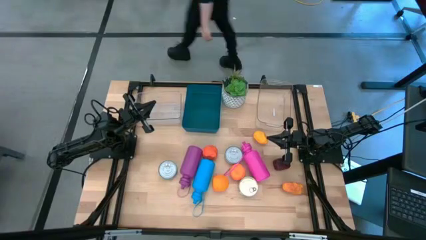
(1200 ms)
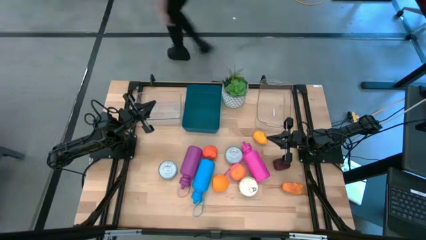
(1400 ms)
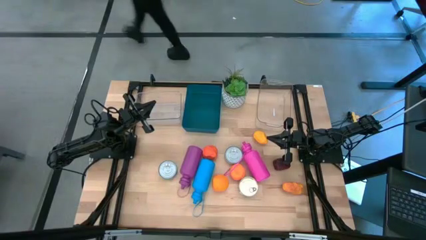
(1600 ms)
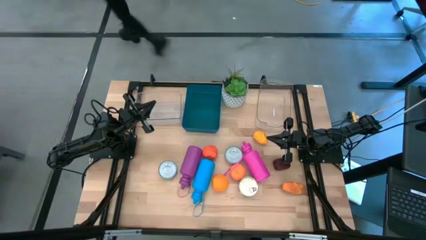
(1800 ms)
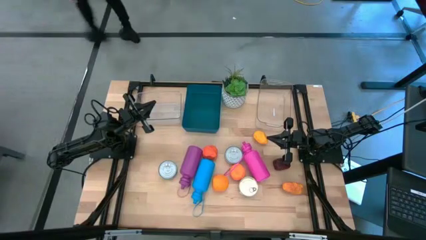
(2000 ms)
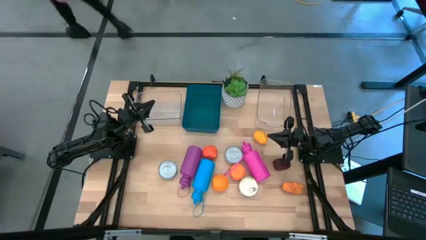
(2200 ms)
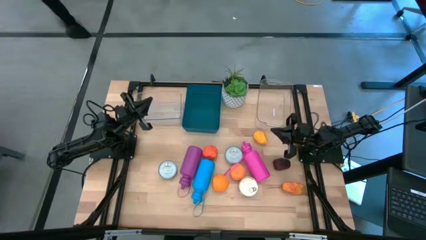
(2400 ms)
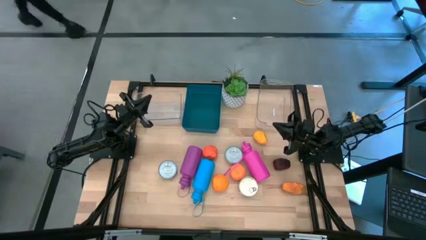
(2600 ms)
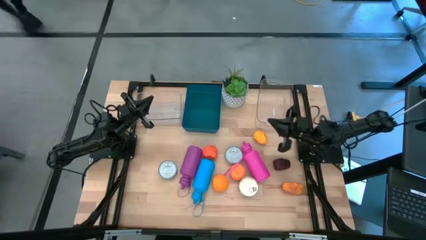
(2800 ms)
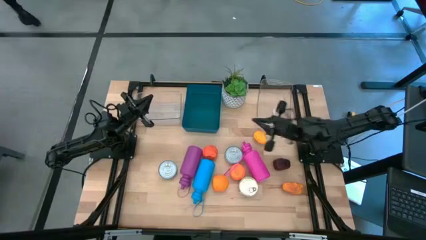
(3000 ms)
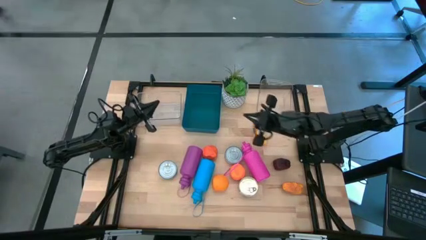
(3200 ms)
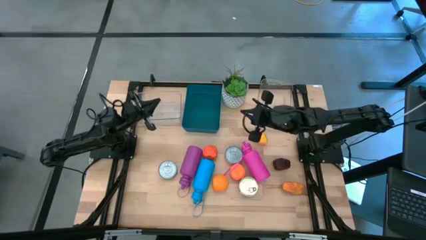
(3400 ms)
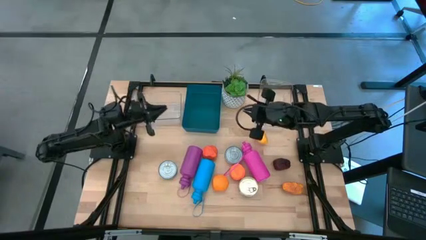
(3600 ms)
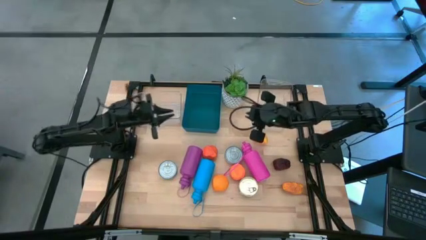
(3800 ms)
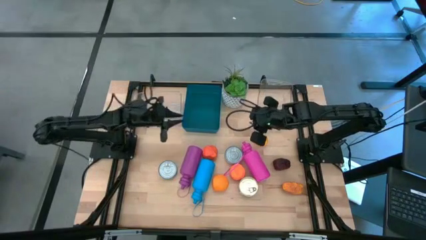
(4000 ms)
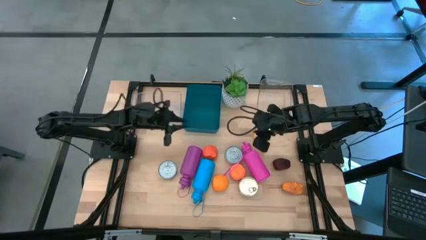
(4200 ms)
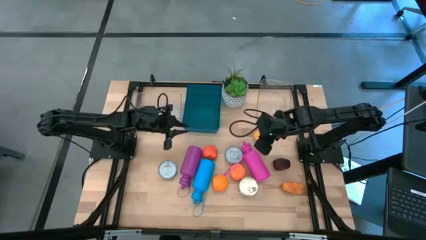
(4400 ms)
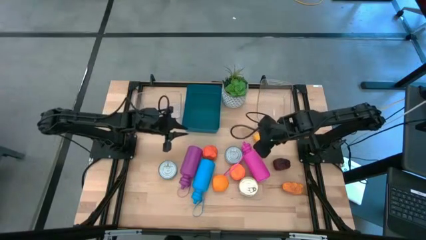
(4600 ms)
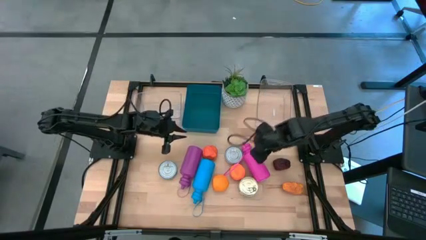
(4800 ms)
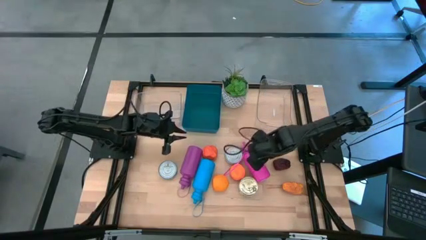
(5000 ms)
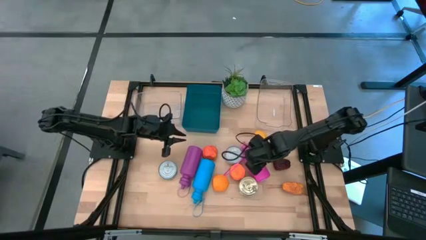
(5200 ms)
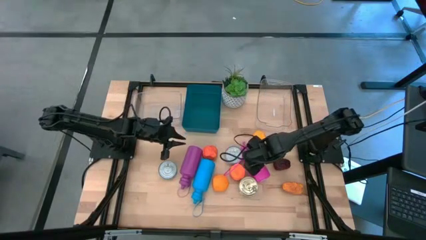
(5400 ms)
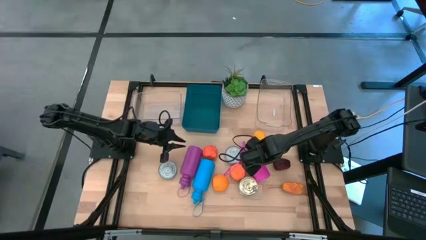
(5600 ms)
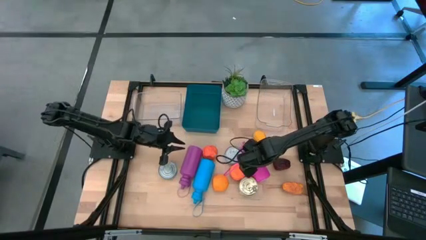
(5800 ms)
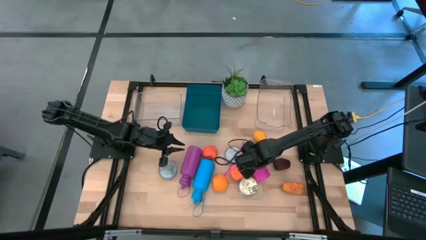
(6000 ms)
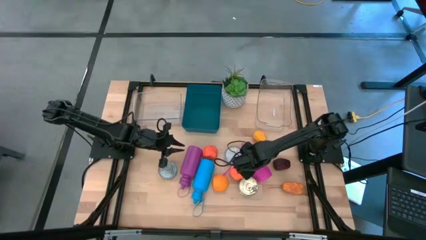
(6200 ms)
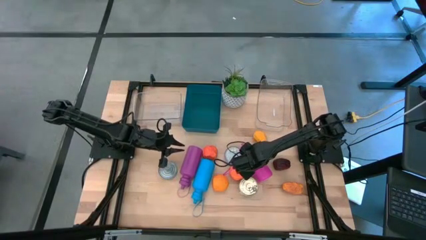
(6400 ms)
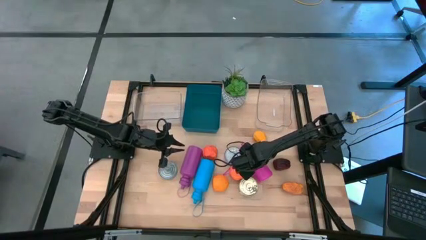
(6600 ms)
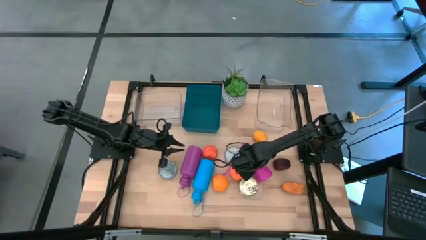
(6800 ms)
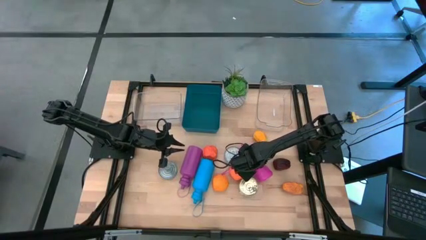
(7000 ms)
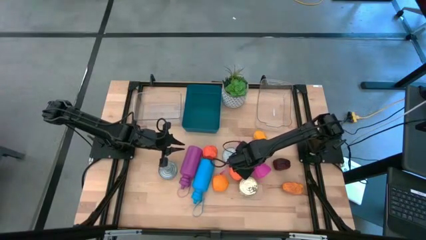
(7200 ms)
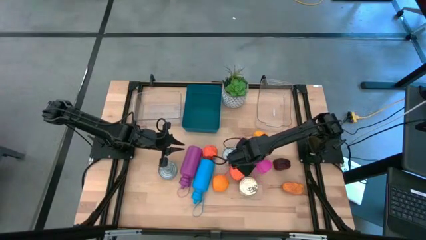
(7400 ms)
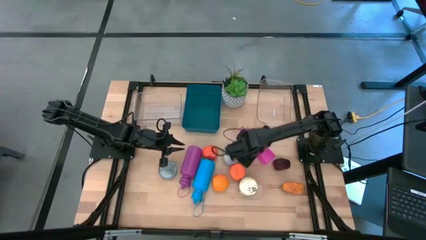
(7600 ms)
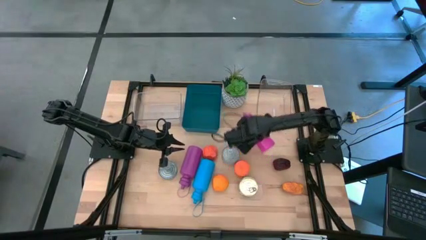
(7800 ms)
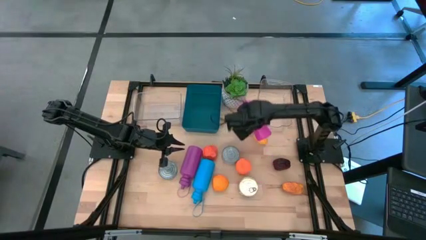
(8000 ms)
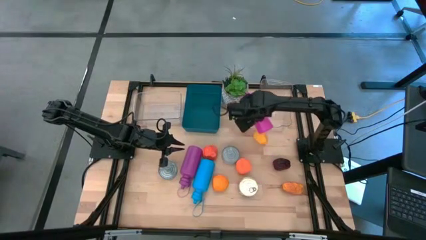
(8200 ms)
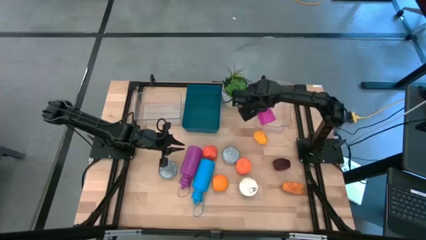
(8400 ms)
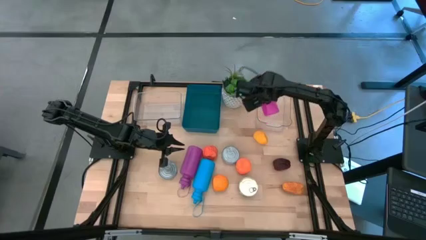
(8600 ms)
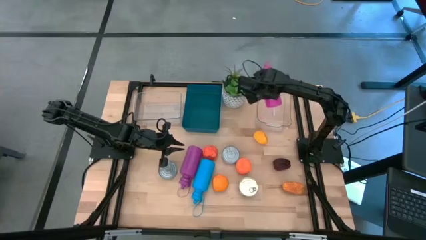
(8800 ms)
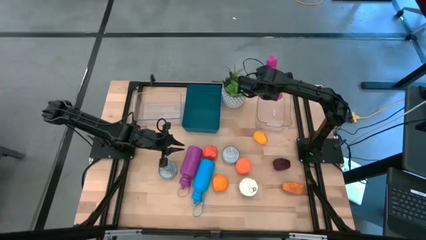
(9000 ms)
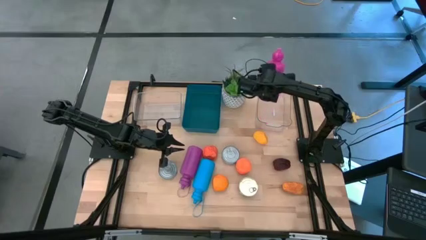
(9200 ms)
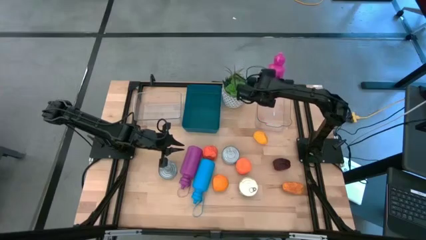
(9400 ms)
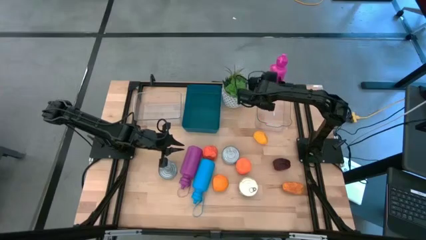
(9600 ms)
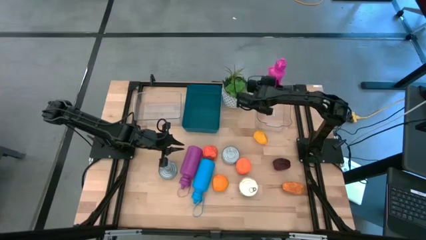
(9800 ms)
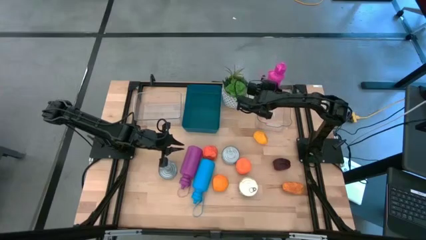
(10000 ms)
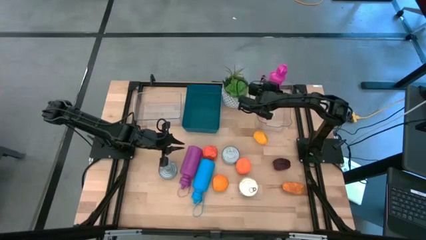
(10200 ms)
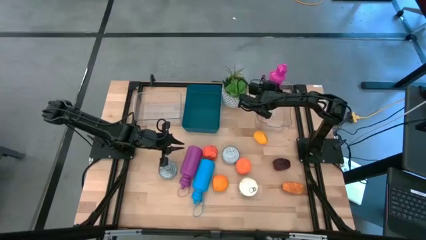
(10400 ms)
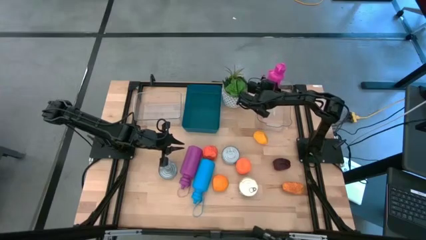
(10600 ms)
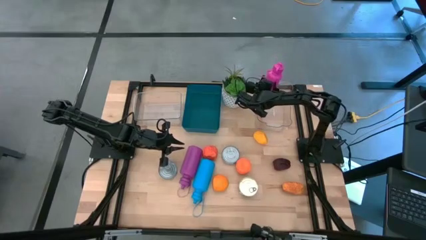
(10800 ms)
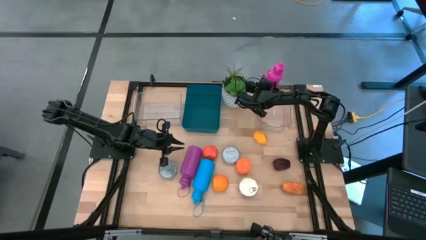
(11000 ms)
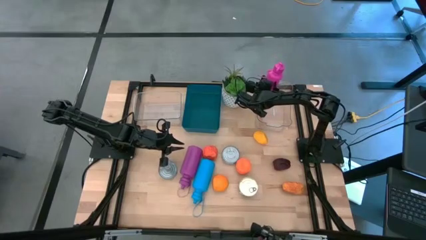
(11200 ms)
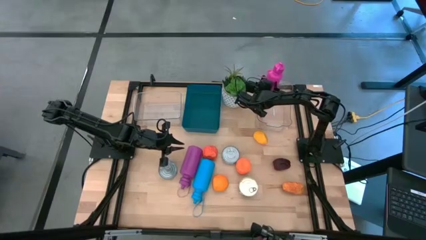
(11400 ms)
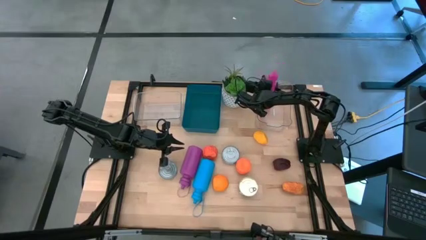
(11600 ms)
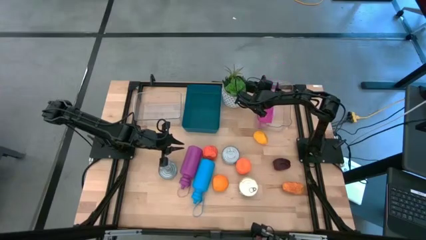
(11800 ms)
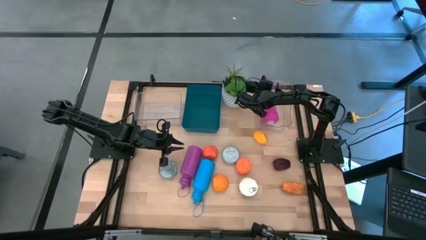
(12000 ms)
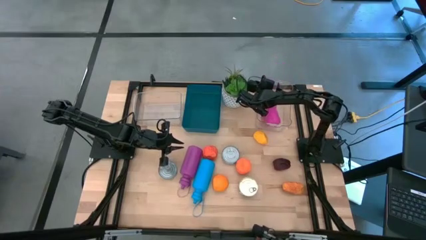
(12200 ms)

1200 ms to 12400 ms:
Task: Pick & Place Food Item
Put the pink water bottle into the right transparent bin

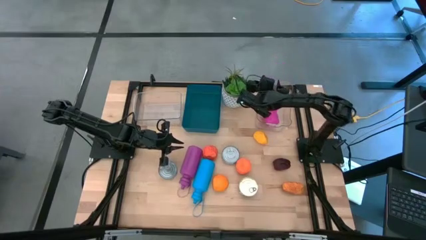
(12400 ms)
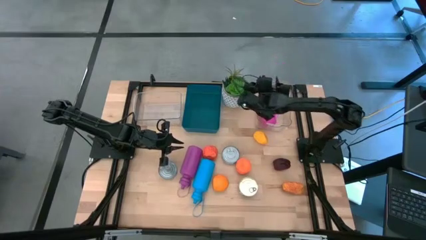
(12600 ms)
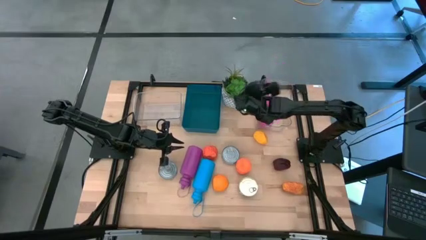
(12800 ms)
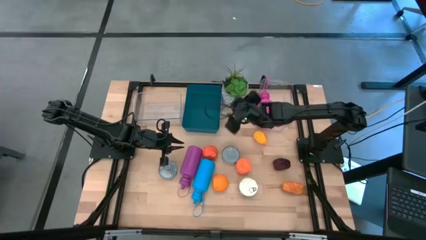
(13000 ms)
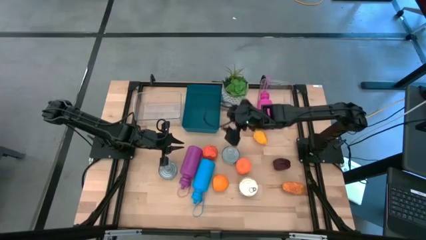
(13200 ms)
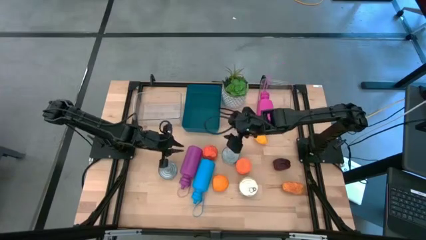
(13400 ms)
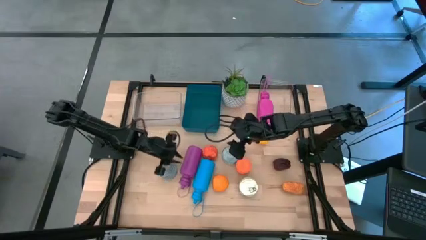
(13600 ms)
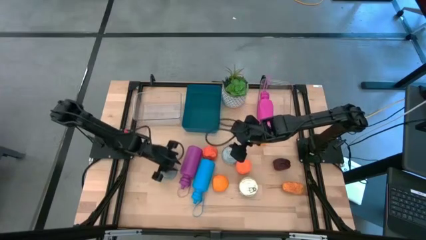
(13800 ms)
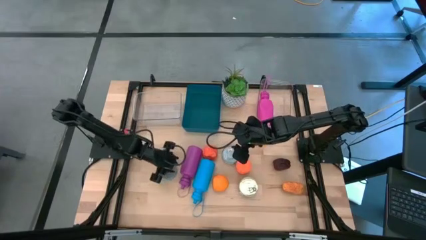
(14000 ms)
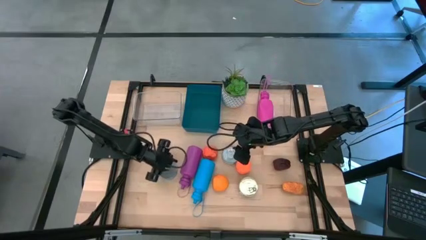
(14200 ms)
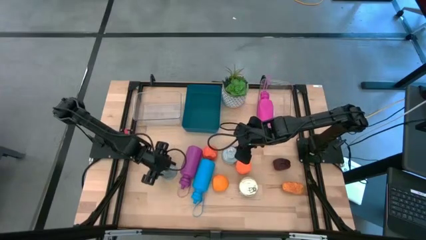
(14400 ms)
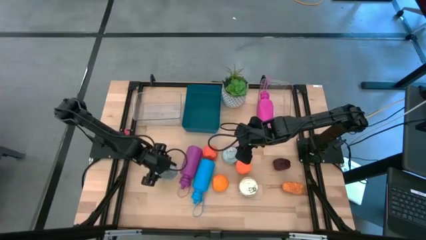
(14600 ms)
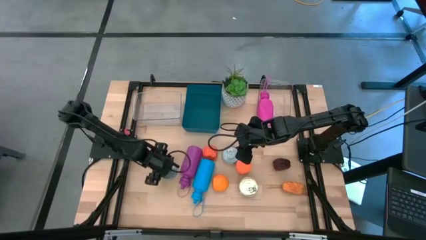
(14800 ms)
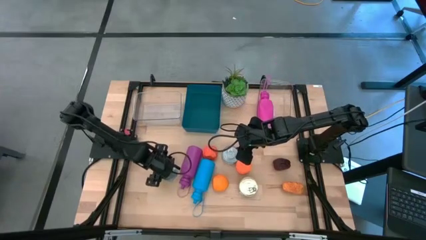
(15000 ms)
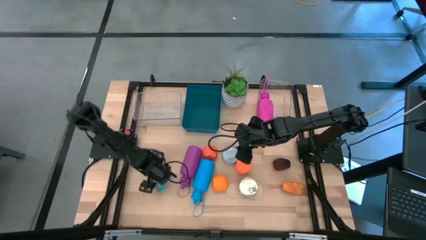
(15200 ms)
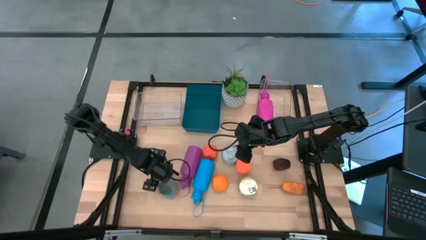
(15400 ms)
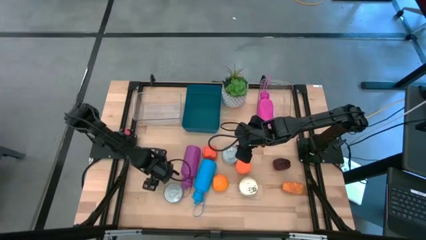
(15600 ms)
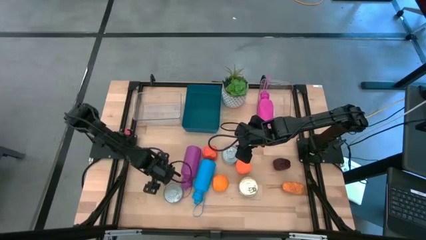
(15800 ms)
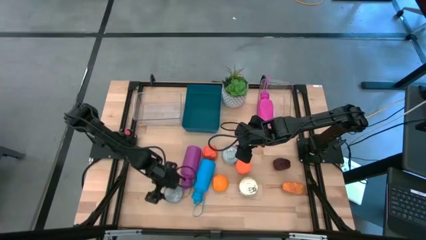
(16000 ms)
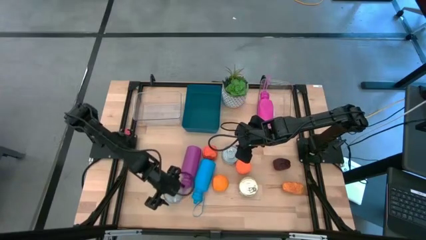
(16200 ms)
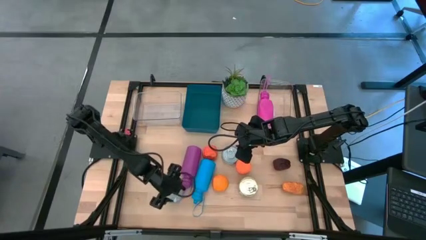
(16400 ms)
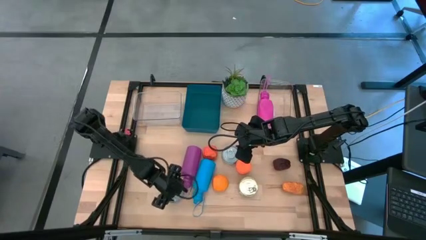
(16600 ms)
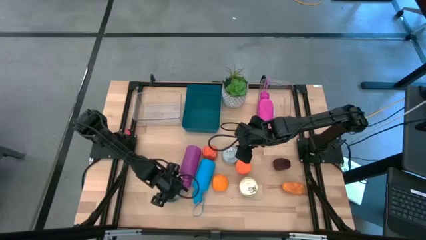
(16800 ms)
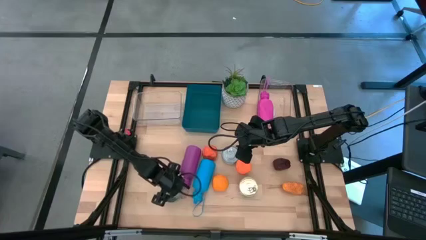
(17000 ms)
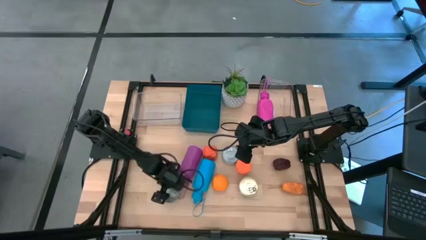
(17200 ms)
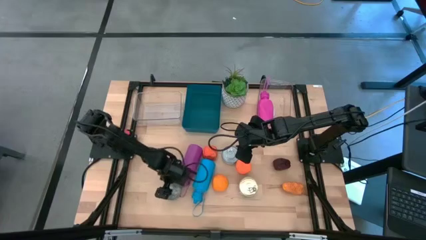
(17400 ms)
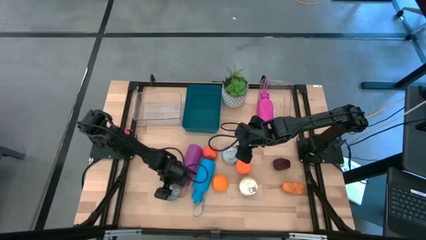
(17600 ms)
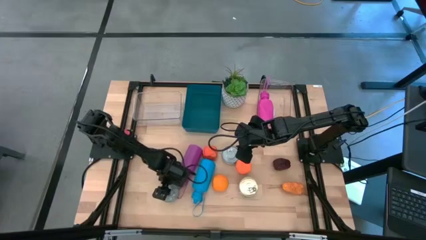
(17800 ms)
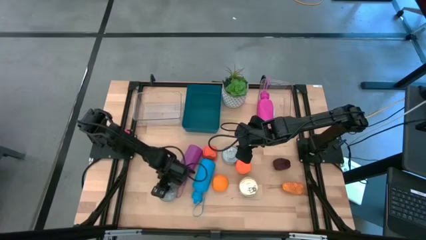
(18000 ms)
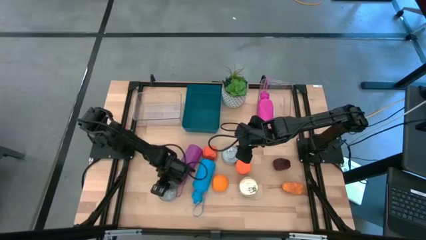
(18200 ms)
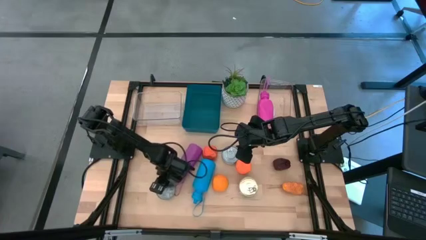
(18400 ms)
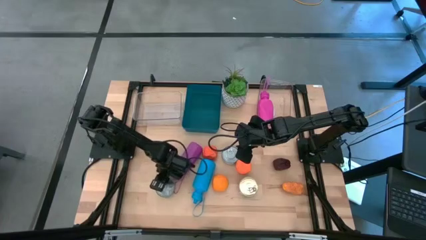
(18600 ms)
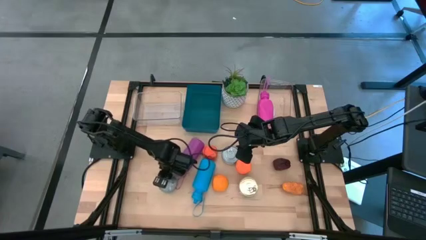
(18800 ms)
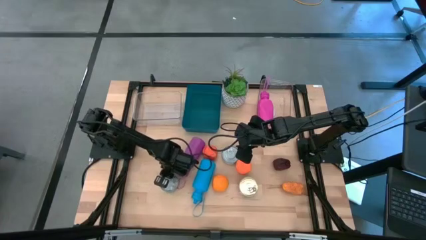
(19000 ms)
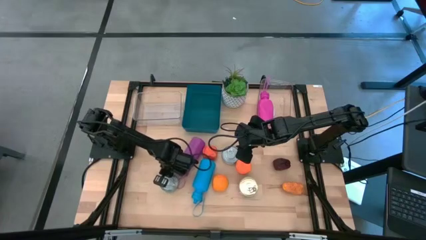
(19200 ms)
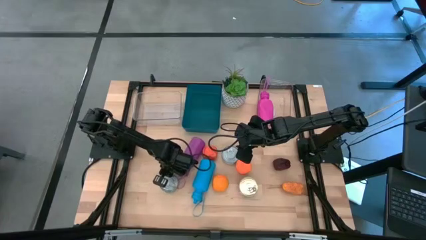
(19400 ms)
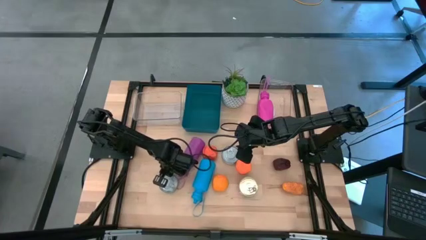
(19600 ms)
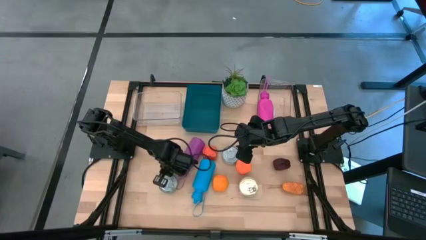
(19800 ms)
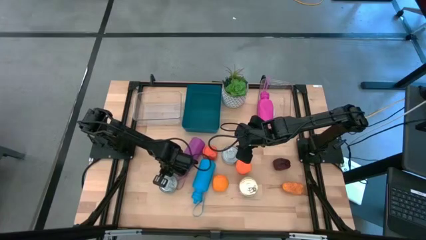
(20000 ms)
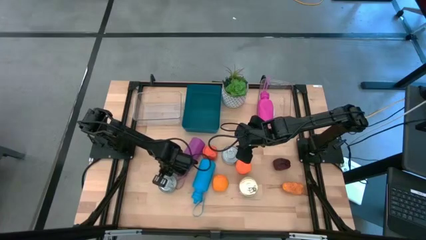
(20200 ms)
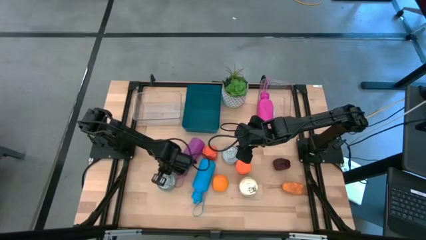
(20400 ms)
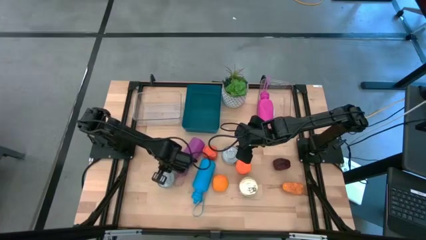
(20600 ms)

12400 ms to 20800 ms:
Put the light blue tuna can into the left transparent bin
